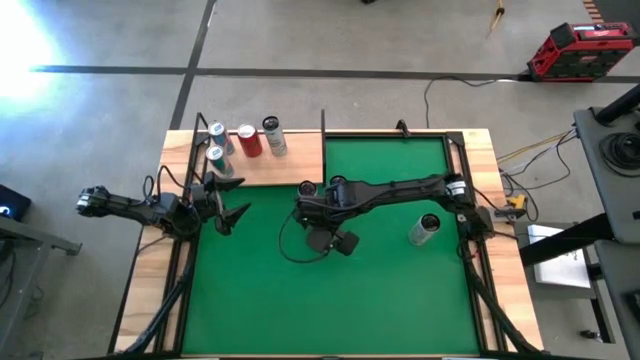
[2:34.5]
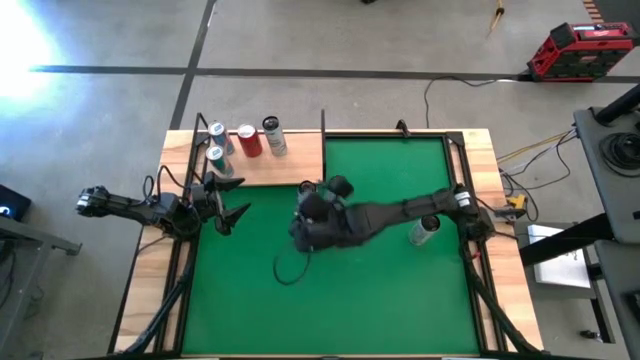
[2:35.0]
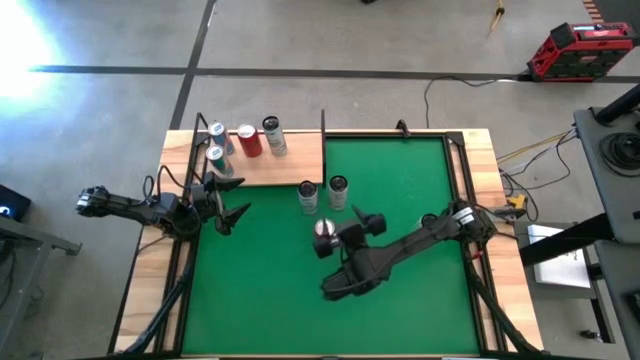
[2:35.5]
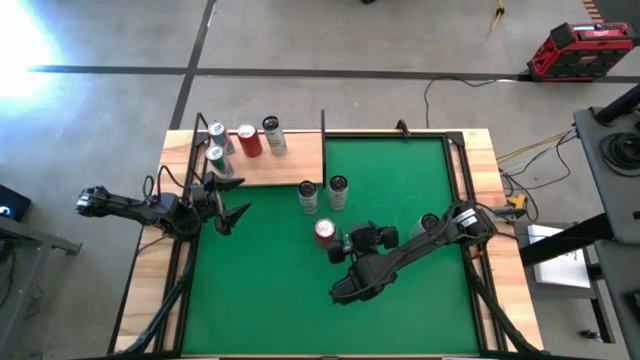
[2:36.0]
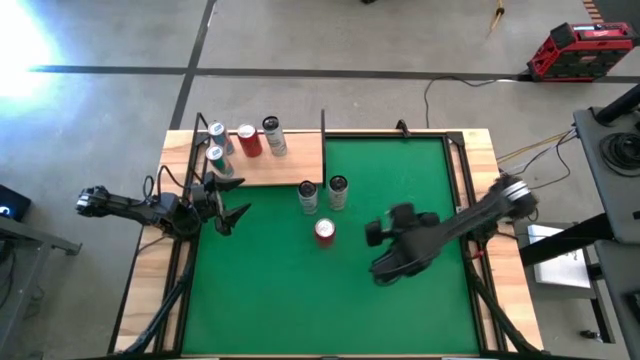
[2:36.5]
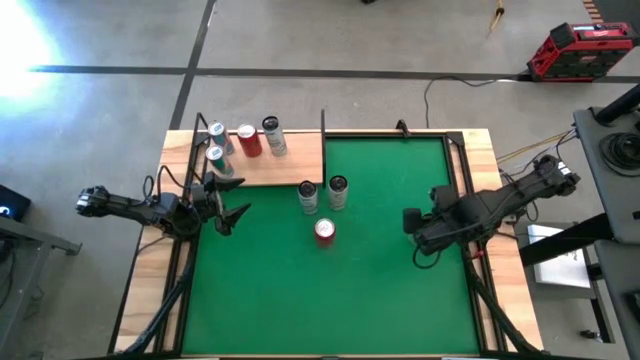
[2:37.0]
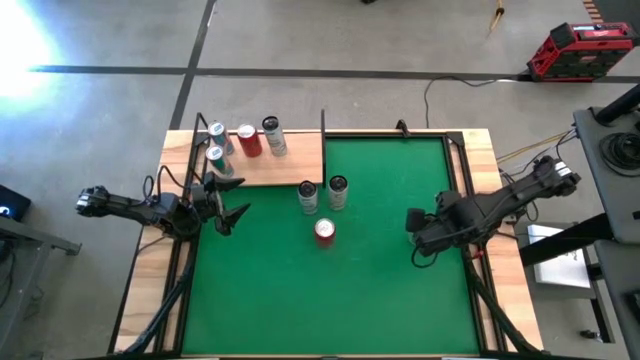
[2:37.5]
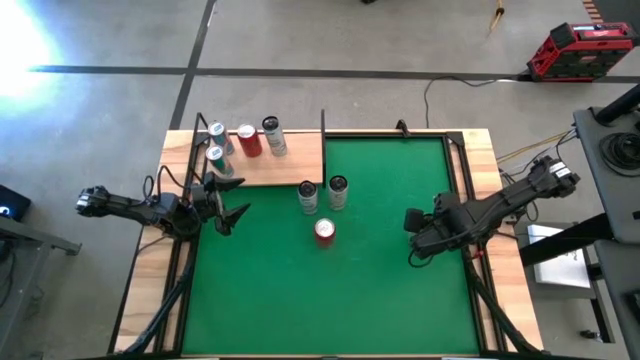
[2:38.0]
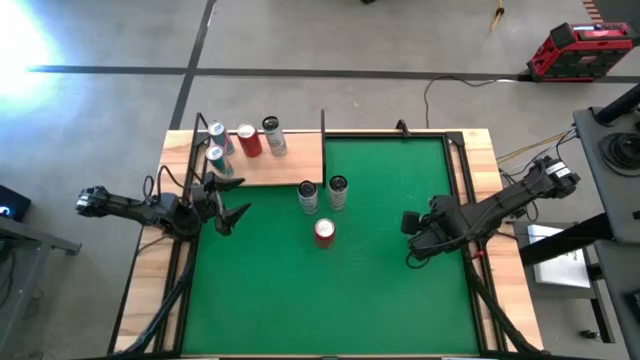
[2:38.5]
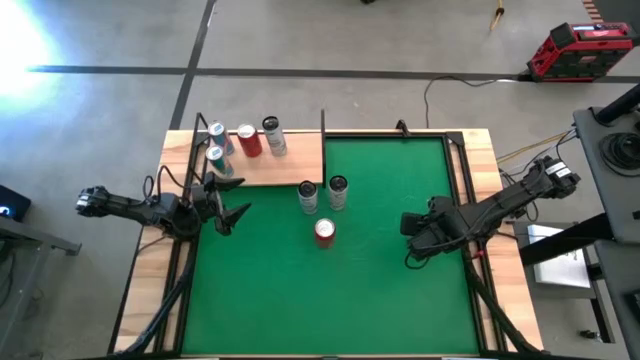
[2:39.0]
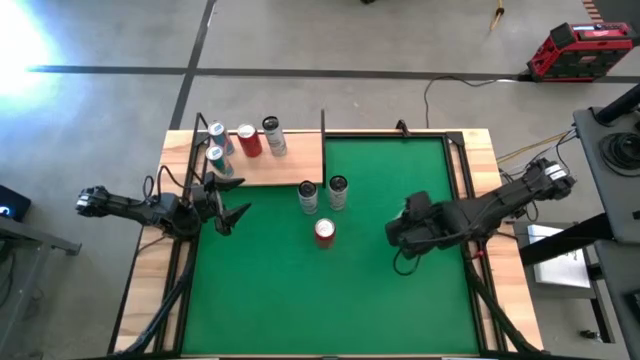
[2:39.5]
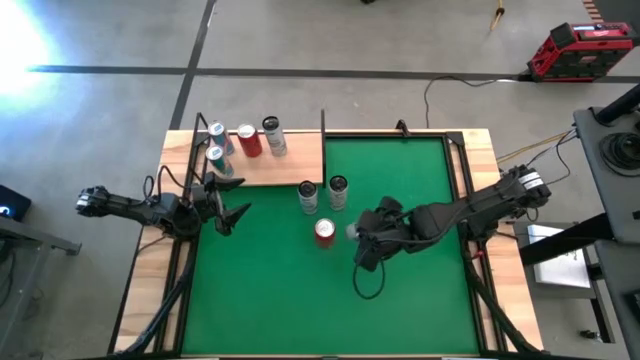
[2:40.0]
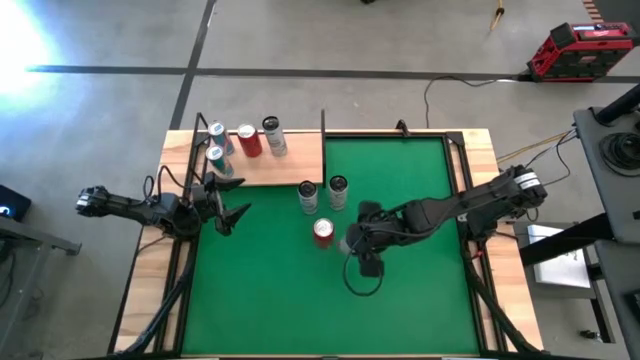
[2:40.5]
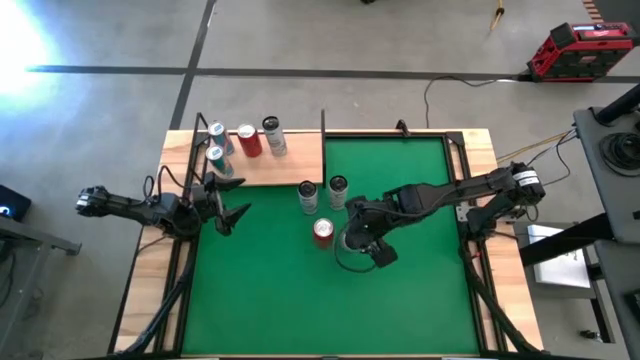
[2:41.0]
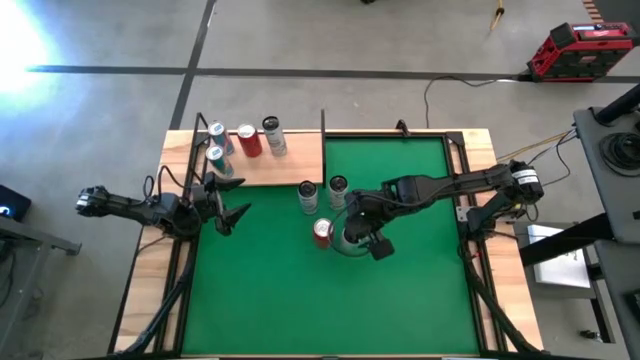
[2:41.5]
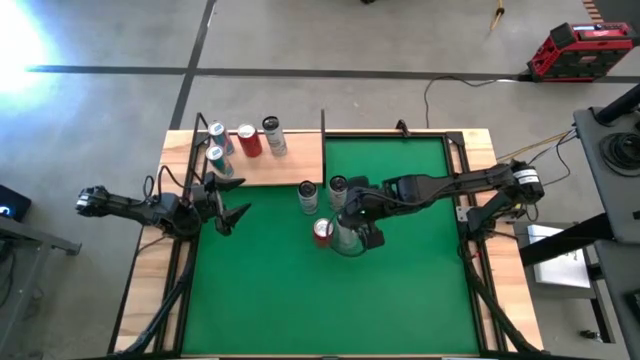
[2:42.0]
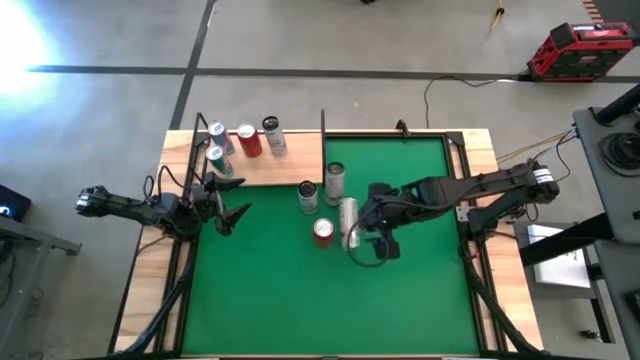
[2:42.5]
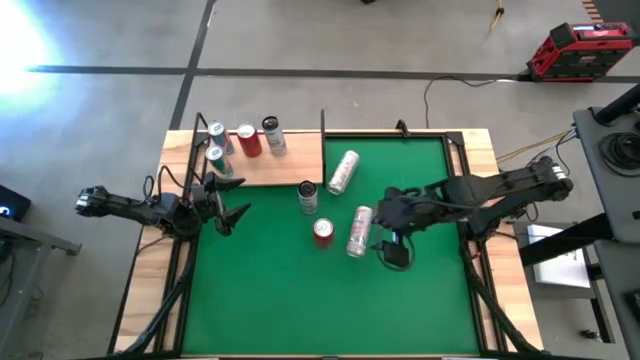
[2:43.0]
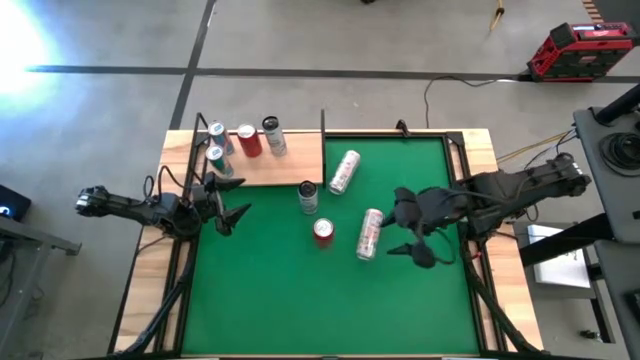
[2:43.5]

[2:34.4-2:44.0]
Task: Place canned beverage on shelf
Move white yellow soda can to the center of the table

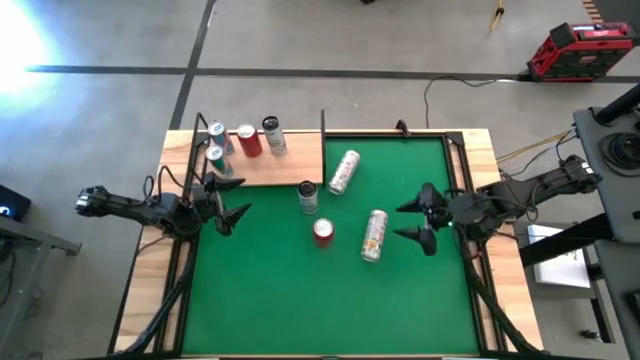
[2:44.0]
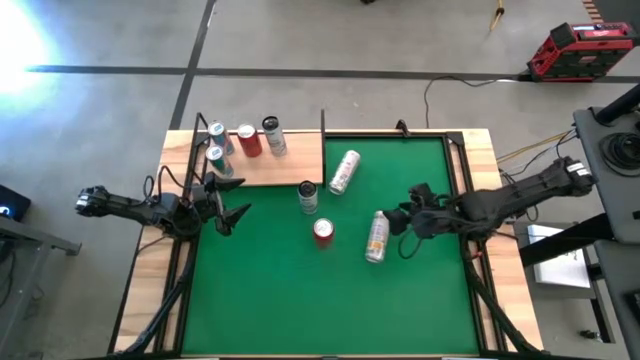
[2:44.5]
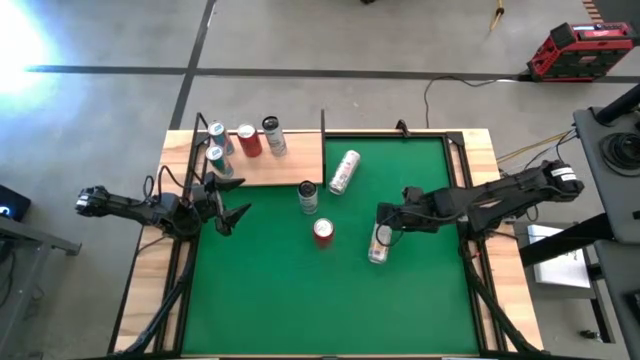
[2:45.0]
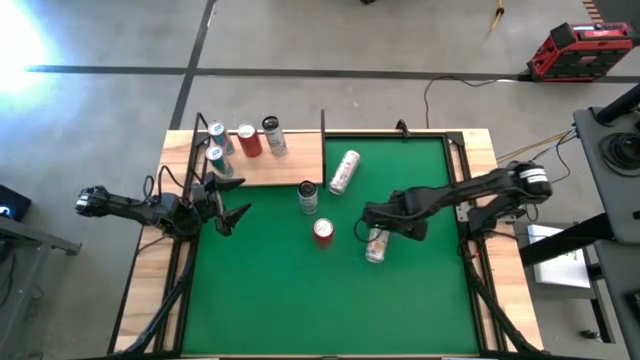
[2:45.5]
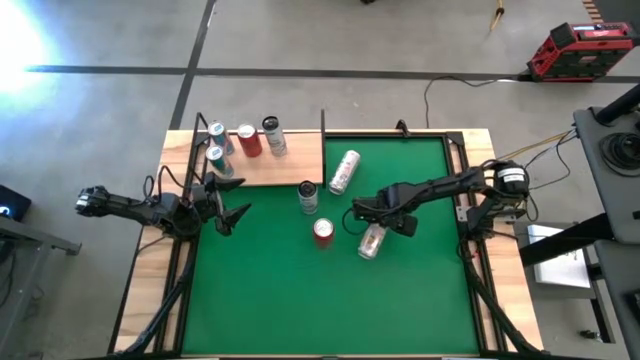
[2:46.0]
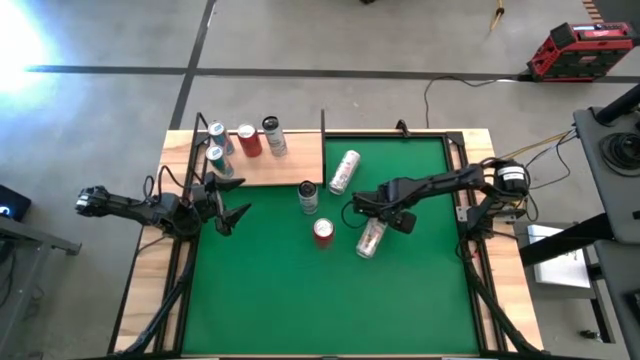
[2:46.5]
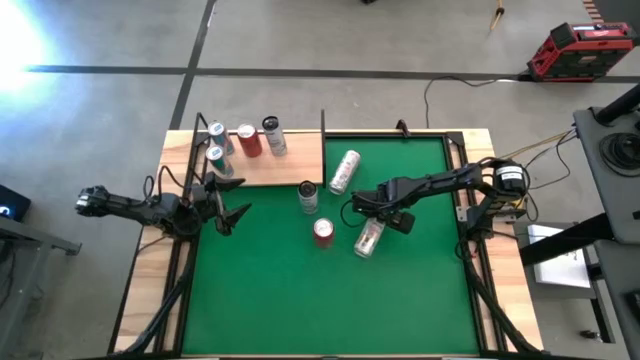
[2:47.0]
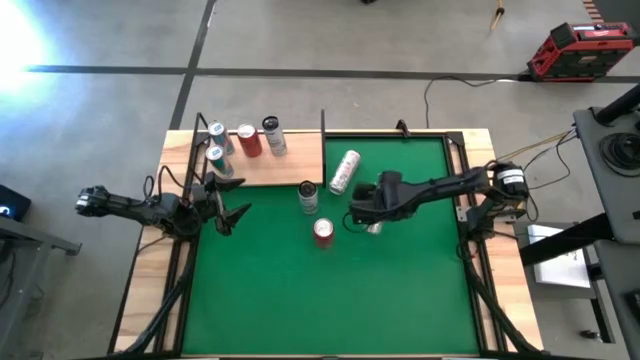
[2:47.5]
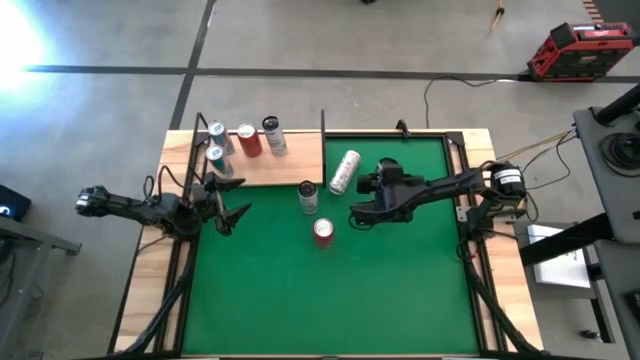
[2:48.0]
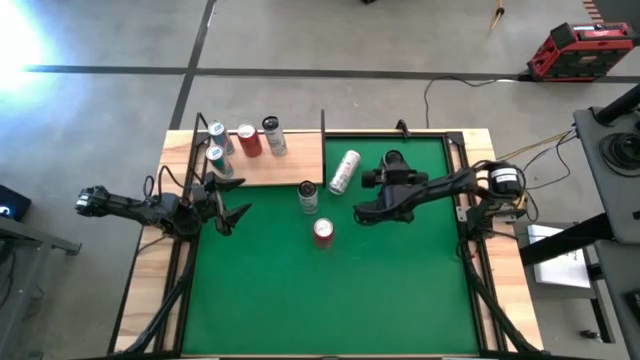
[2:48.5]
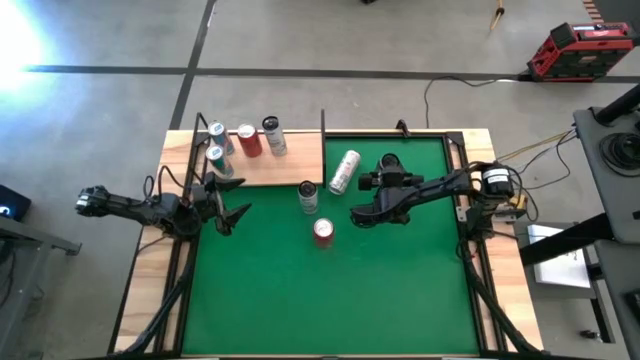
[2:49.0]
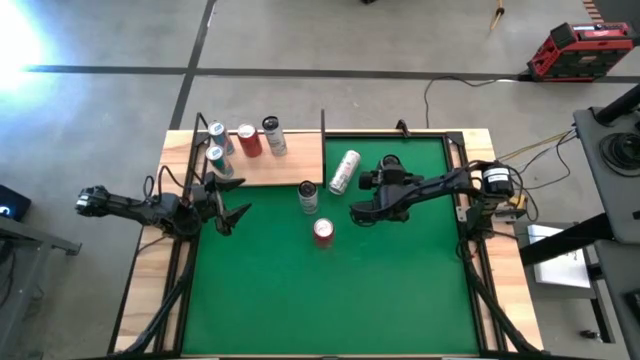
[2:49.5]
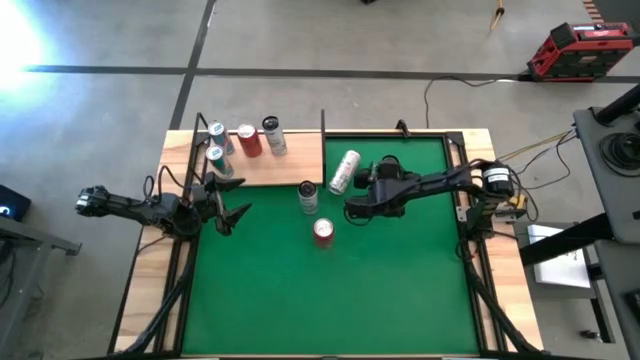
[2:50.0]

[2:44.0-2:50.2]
Adjust the white yellow soda can on the table

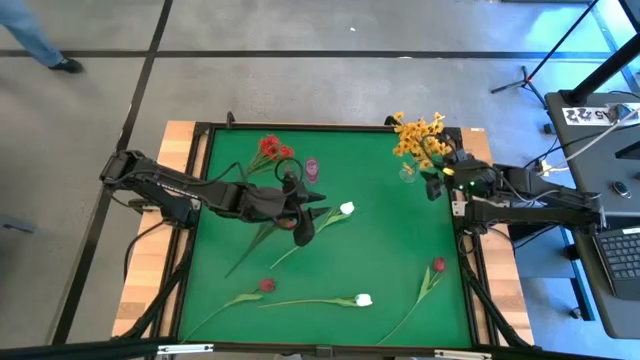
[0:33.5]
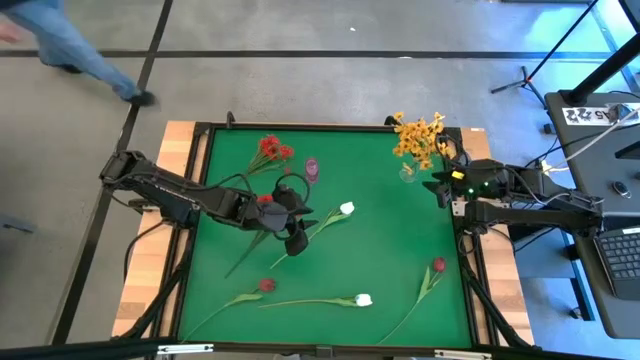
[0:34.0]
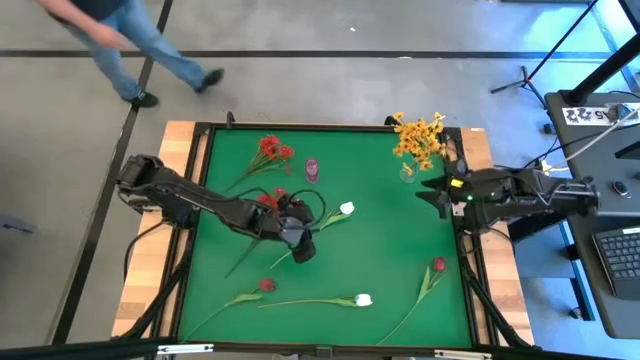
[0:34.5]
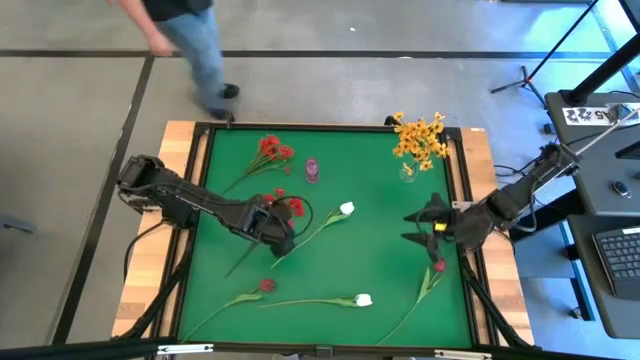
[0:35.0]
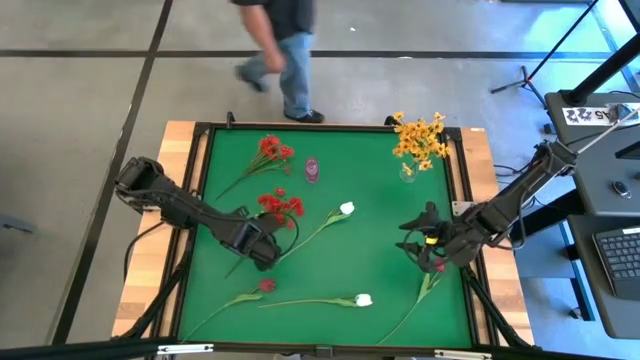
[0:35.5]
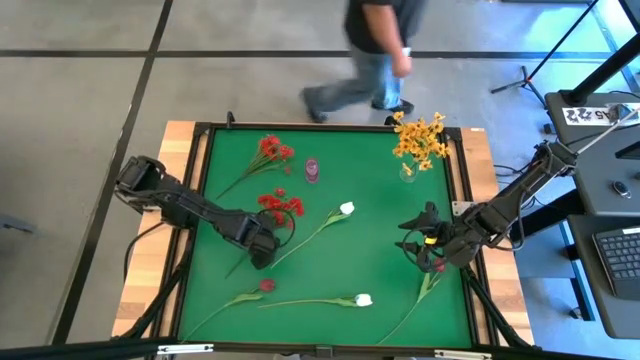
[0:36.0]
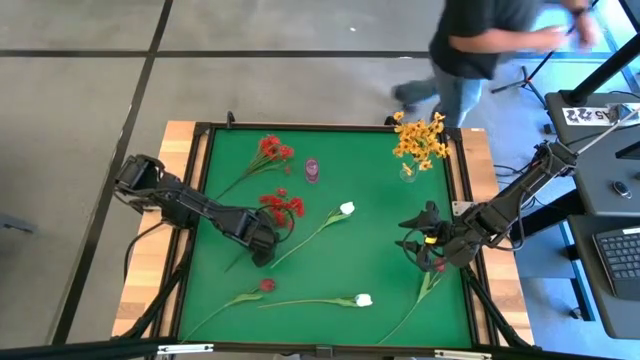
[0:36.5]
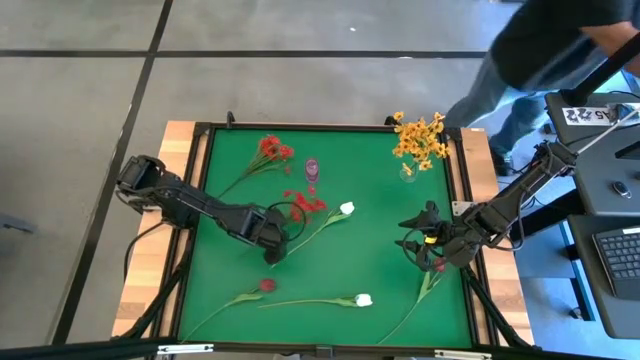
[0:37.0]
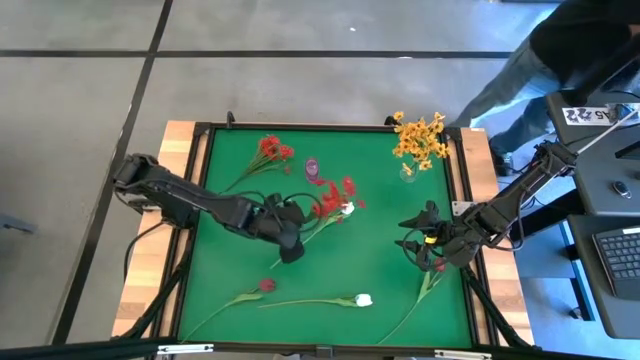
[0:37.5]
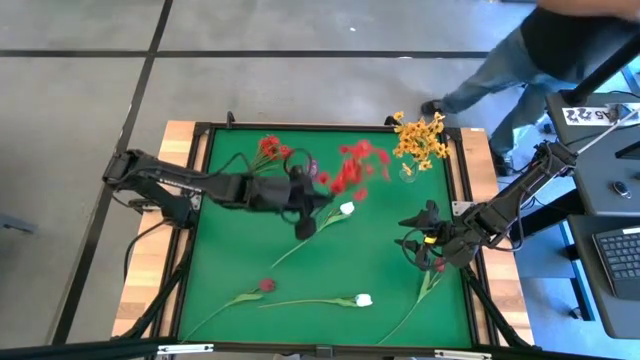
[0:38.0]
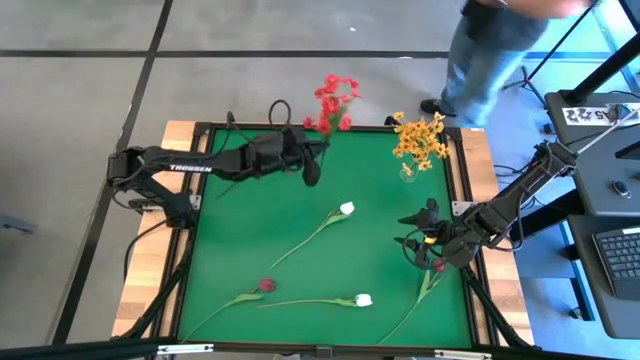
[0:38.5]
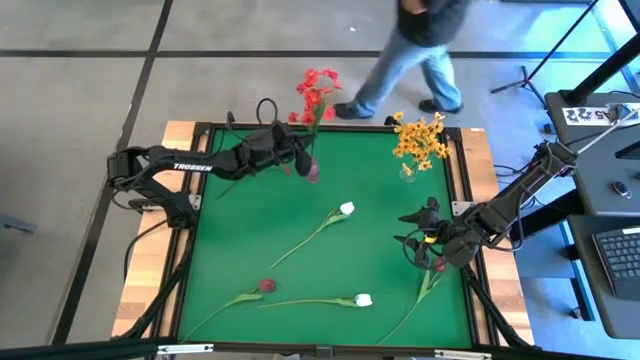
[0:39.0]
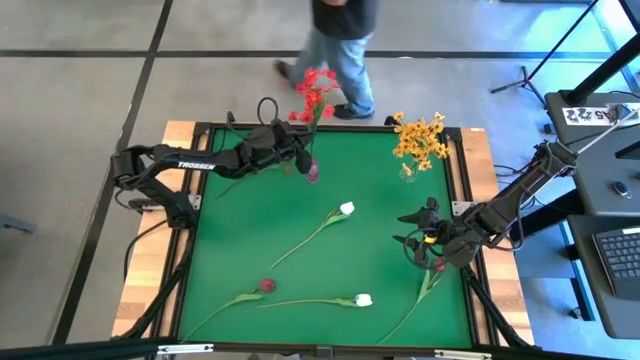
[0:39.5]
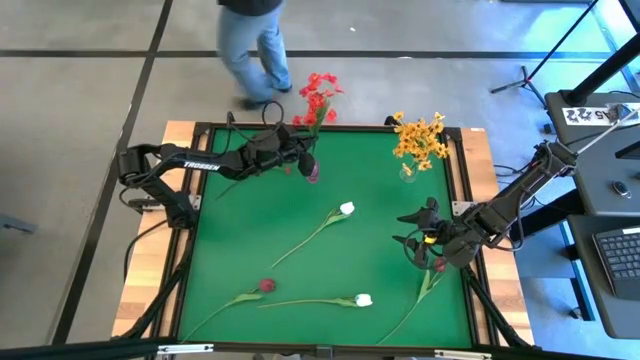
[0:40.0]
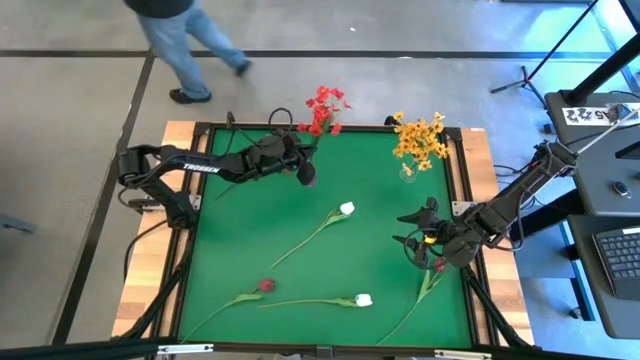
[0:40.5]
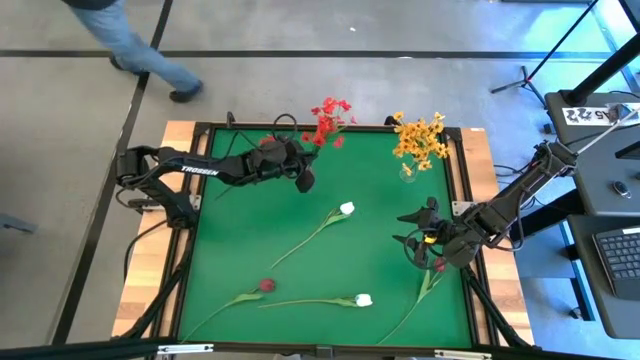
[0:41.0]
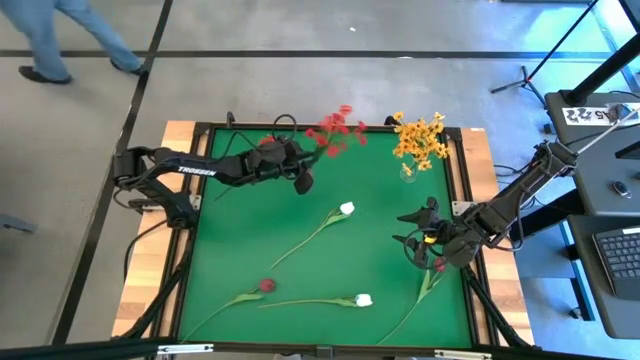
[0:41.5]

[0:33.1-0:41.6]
Task: Sort flowers into vase by color
Put the bottom red flowers into the pink vase
